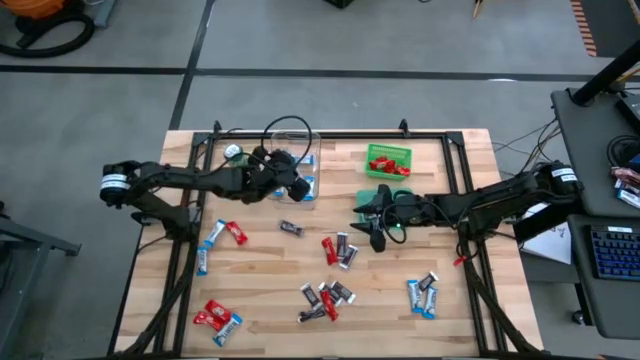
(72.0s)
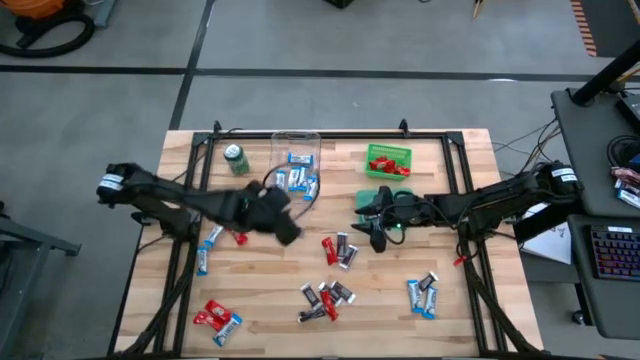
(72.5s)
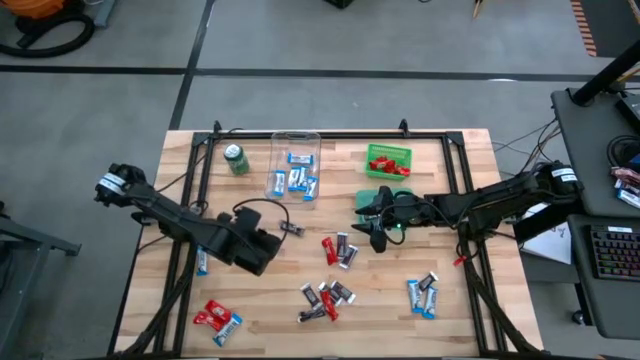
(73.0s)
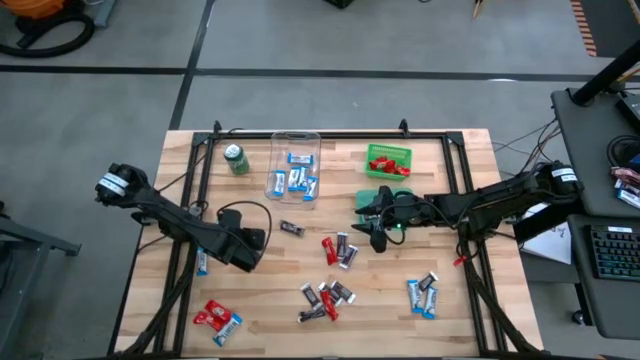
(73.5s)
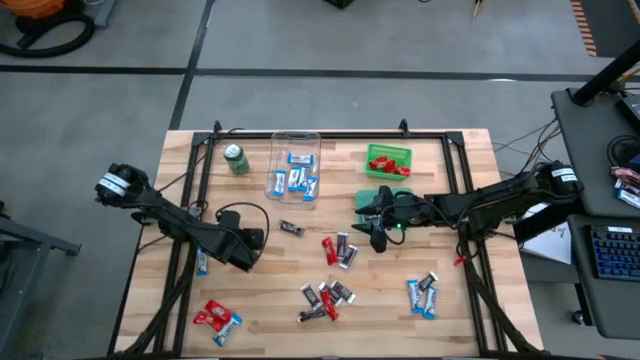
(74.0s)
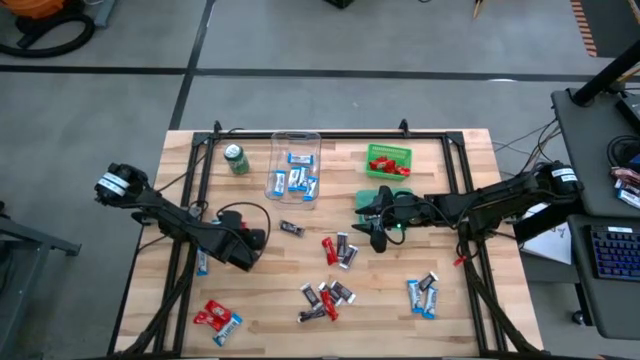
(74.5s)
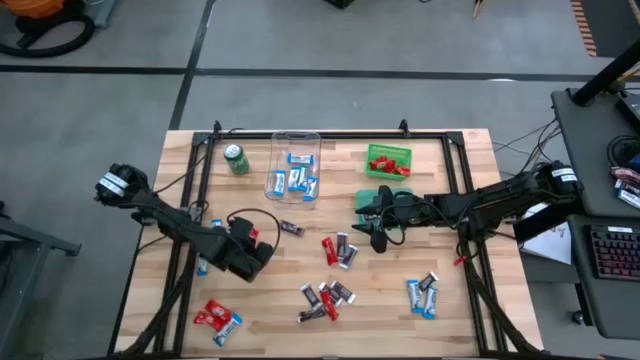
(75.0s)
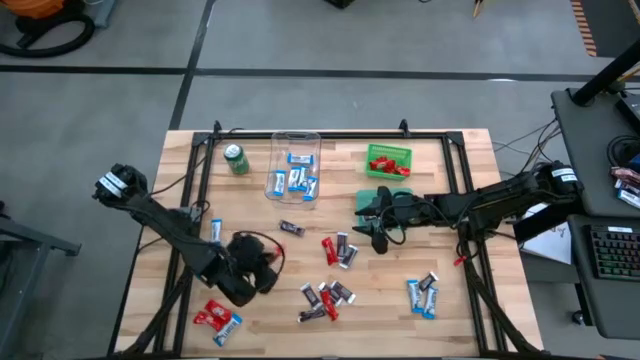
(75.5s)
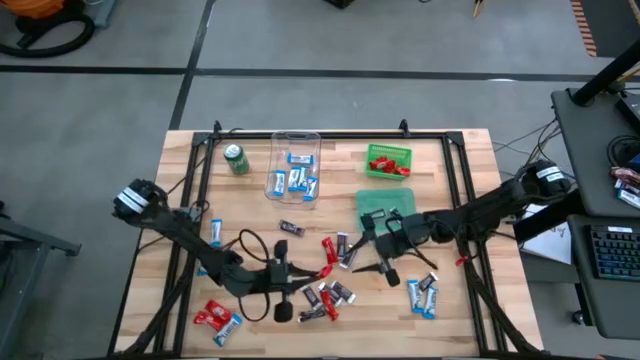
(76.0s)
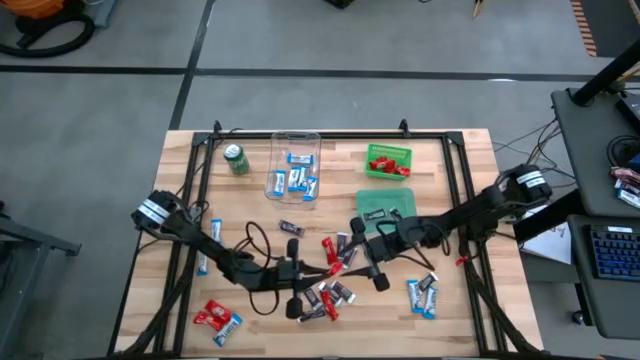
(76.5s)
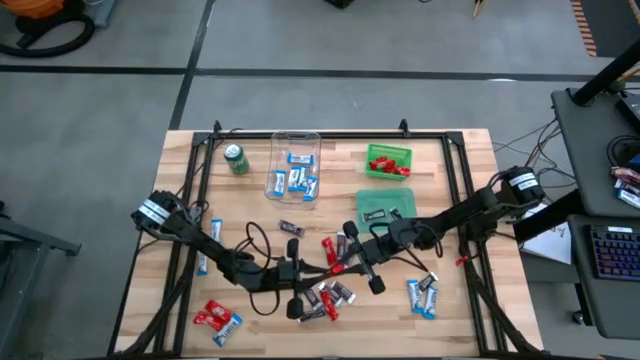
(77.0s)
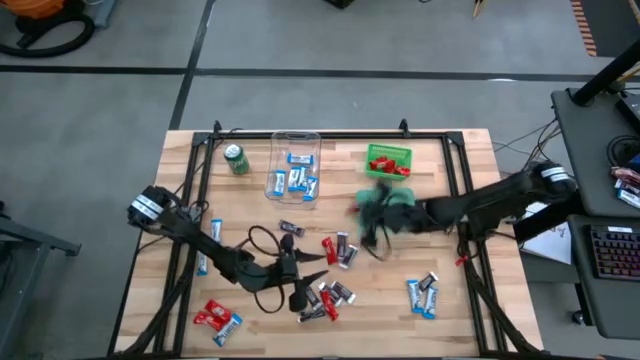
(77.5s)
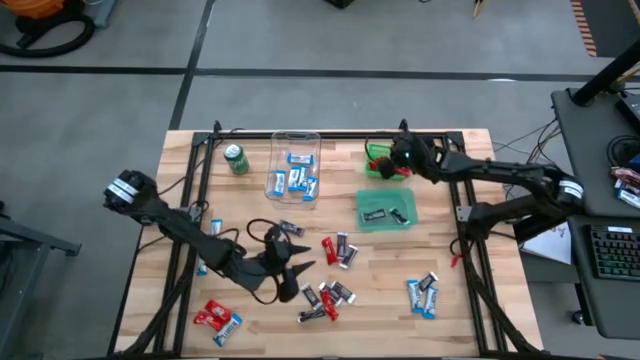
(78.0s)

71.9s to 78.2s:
Task: Sort candy
Put the red candy into the green bin

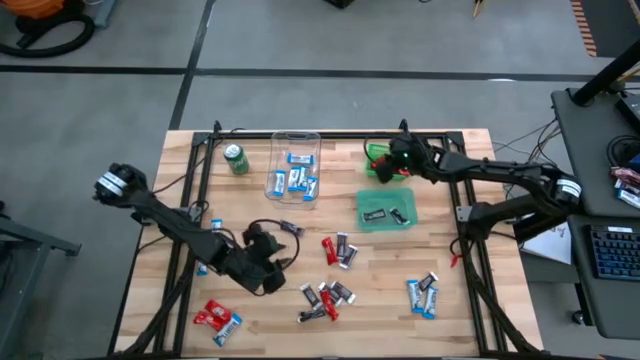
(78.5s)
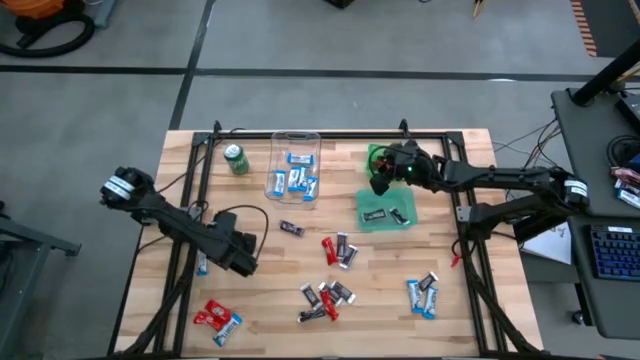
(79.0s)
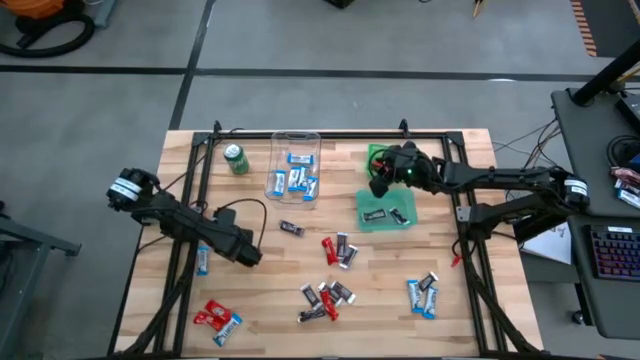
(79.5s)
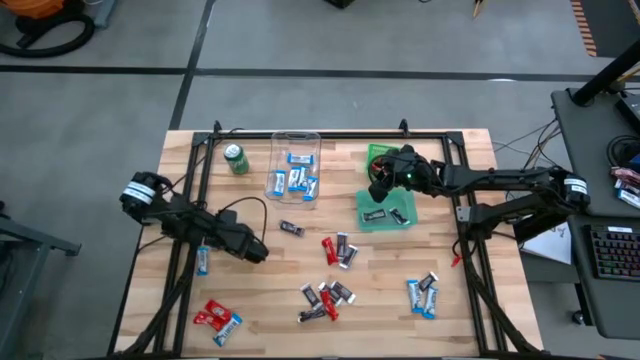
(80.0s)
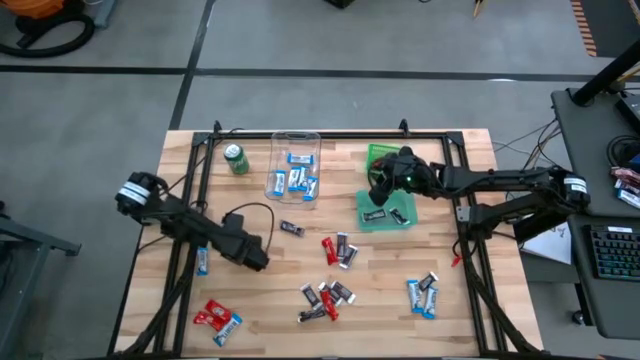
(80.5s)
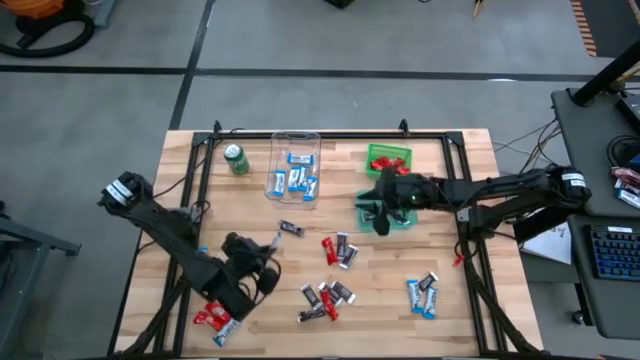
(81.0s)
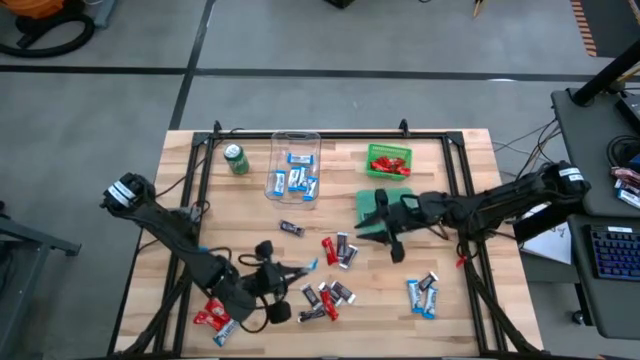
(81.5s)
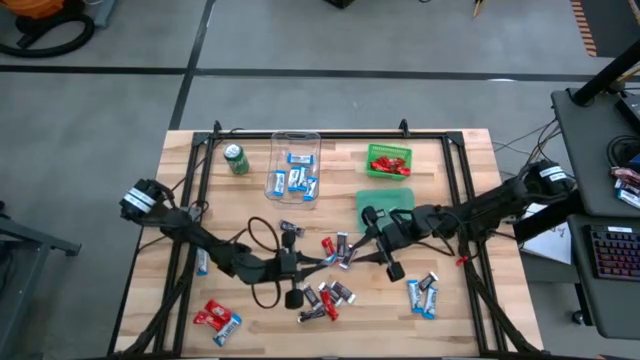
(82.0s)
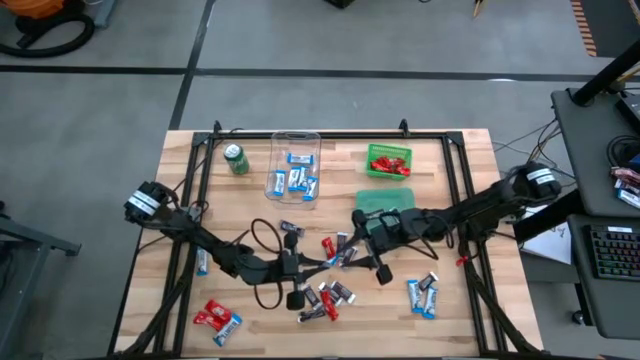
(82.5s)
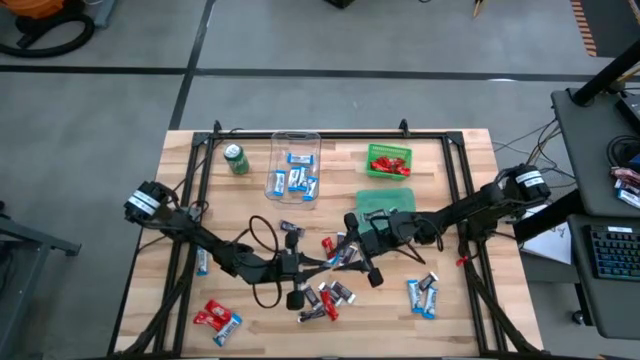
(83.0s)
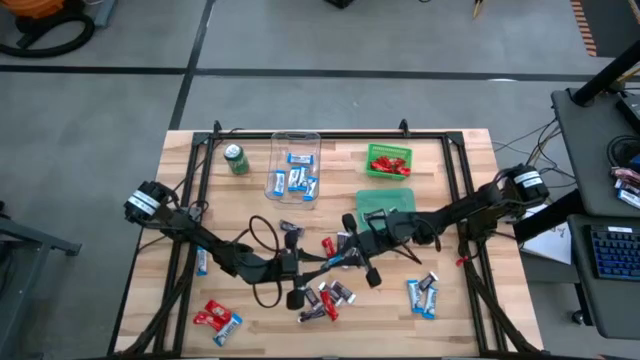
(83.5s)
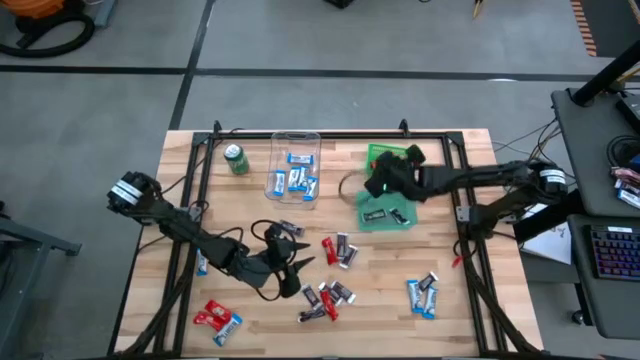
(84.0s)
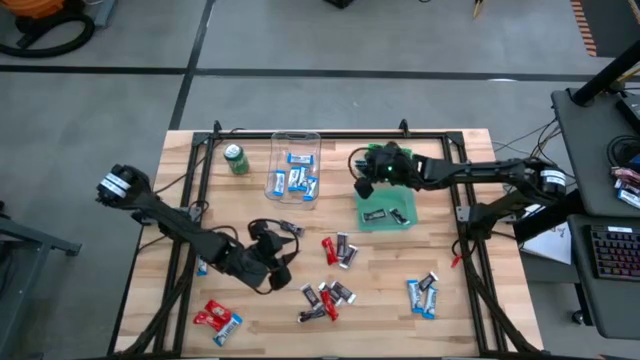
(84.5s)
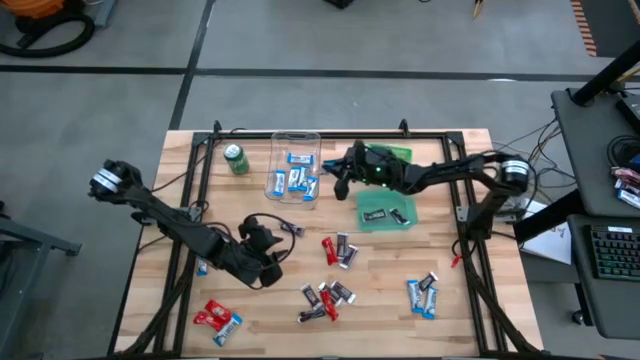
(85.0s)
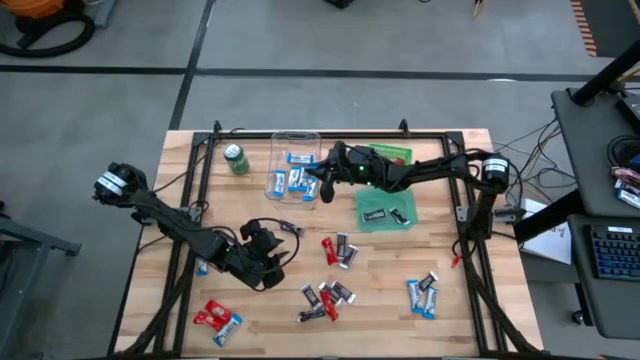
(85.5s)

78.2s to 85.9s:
Put the white candy into the transparent bin

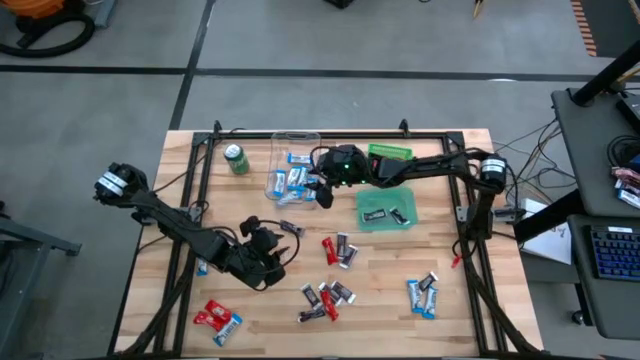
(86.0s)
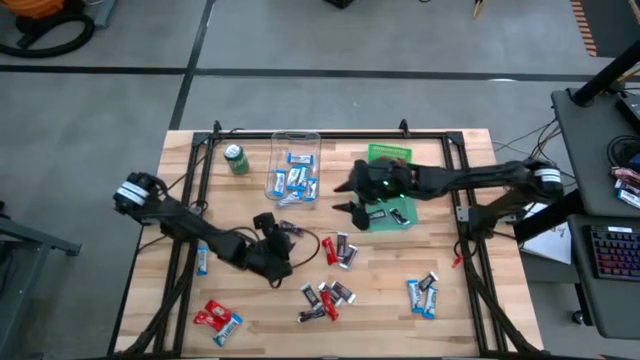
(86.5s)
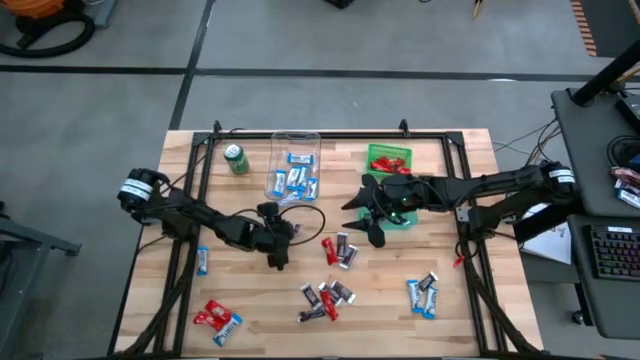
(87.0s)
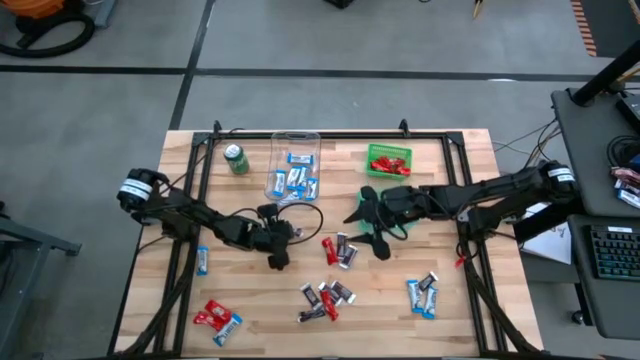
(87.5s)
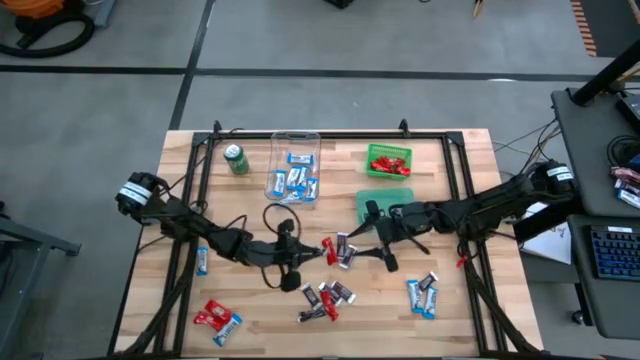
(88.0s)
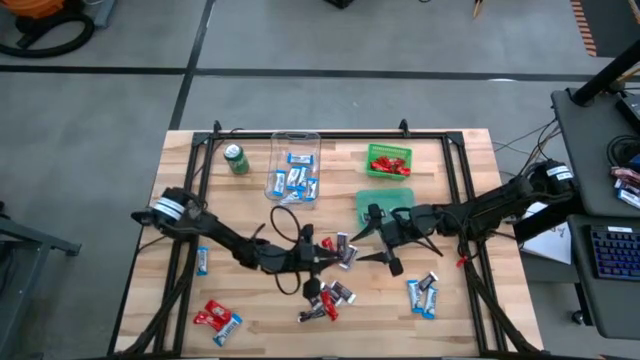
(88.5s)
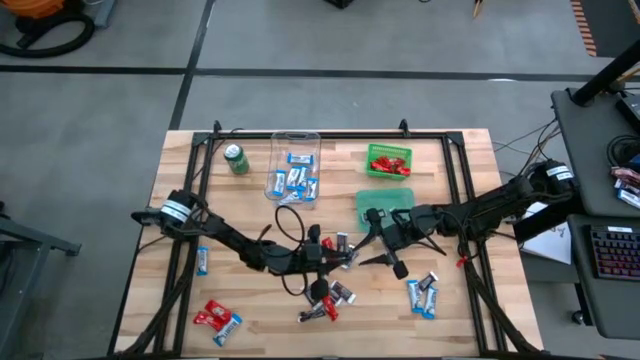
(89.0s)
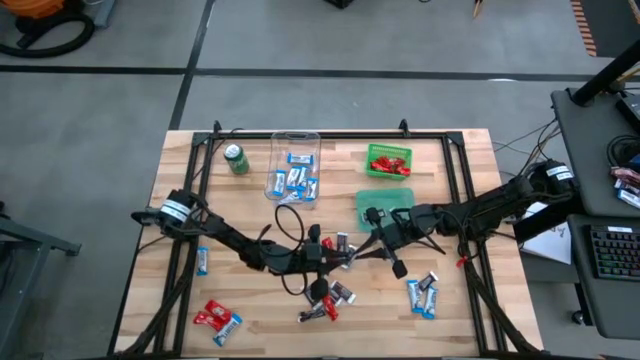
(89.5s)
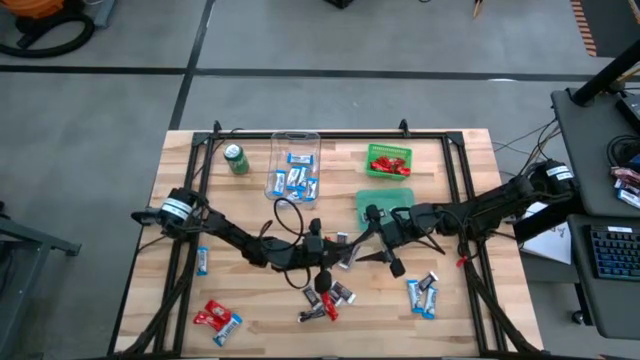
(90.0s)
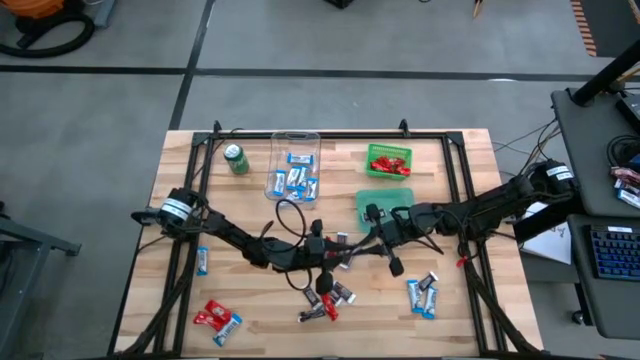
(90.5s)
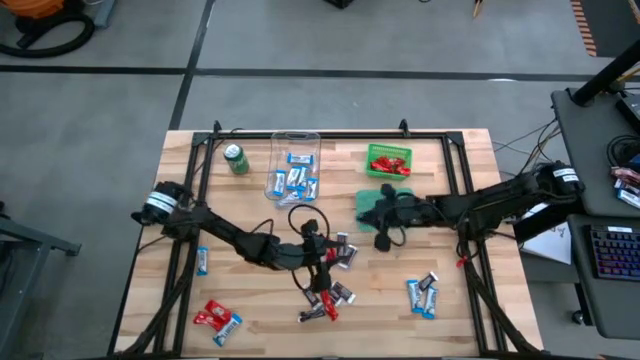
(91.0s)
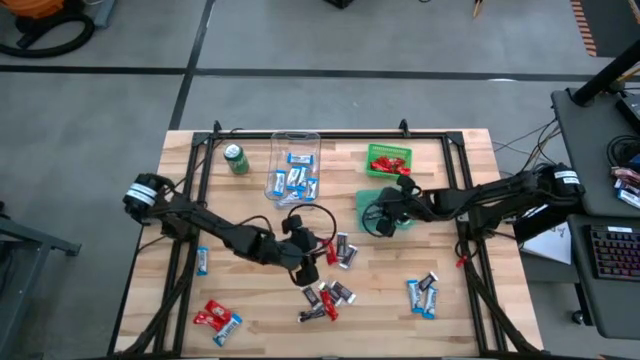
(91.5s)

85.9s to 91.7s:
Put the brown candy into the blue bin

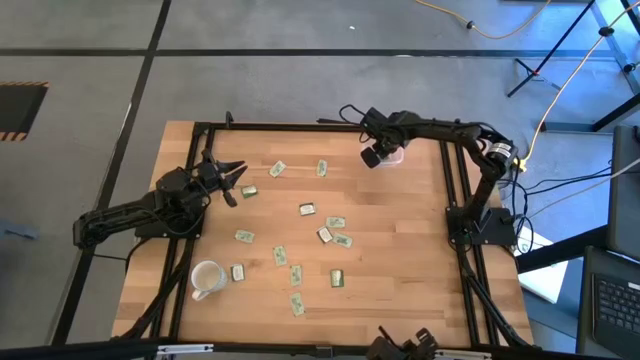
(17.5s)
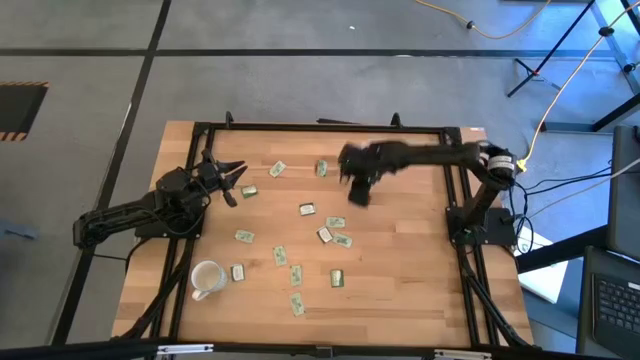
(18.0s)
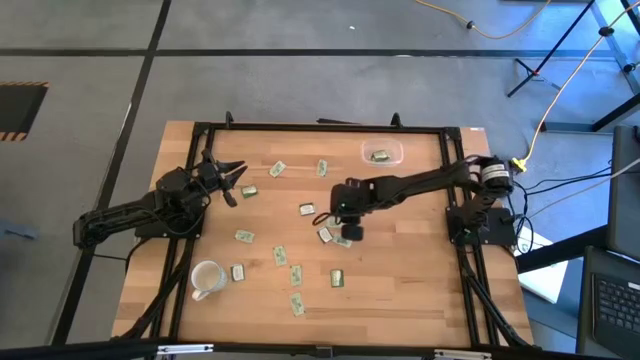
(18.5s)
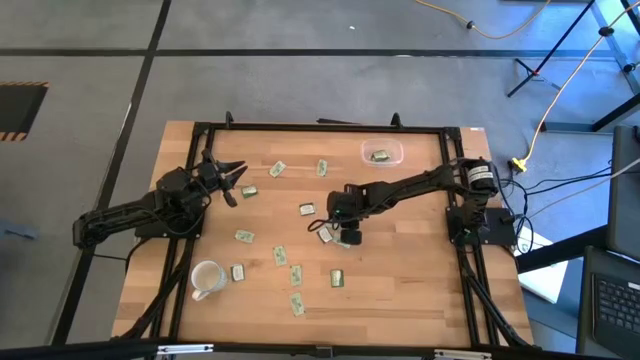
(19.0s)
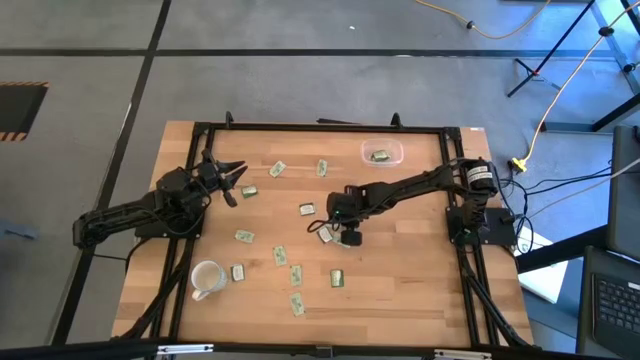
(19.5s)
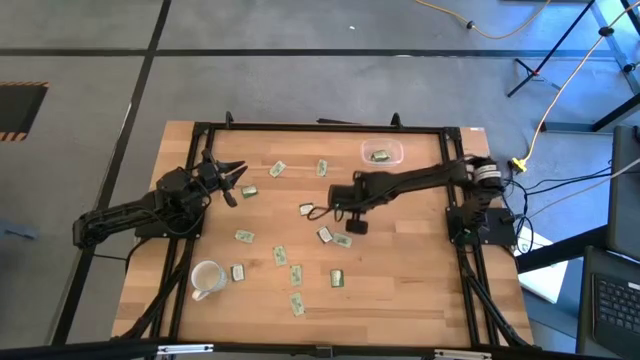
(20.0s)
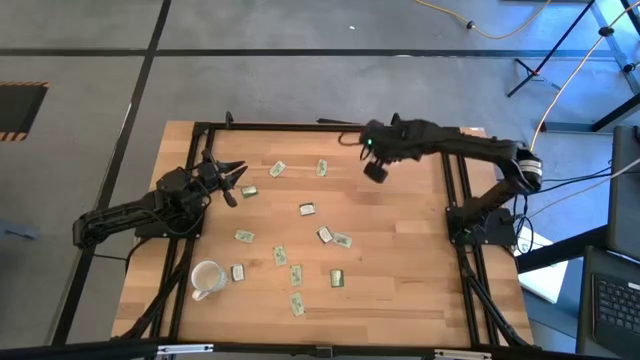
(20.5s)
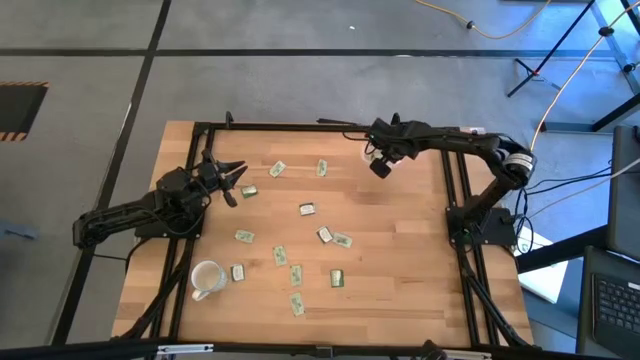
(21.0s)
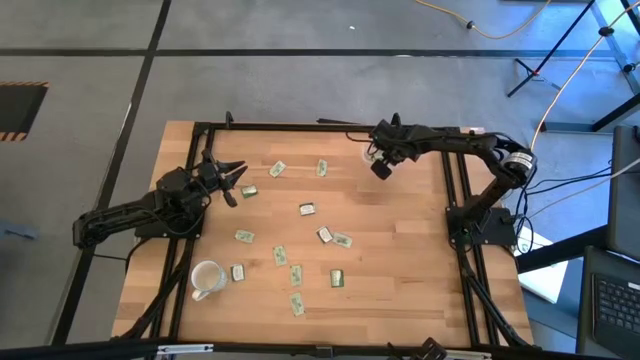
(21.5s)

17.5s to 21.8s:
Task: Pick and place Stevia / Truvia into bins
Put the green stevia packet into the transparent container
